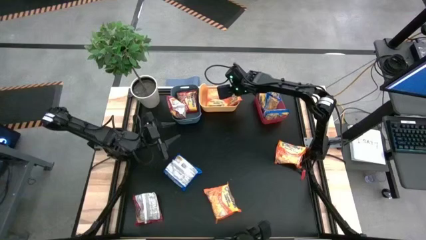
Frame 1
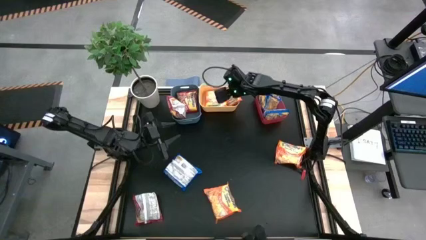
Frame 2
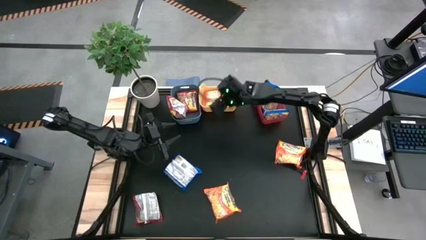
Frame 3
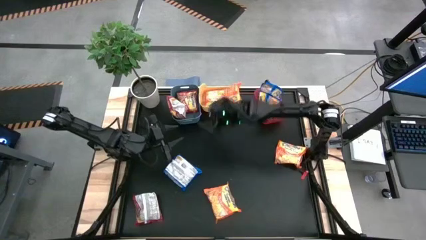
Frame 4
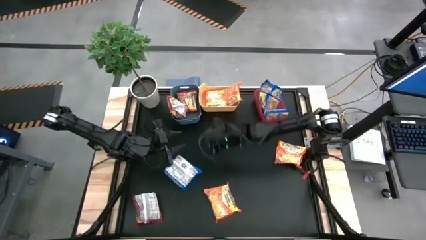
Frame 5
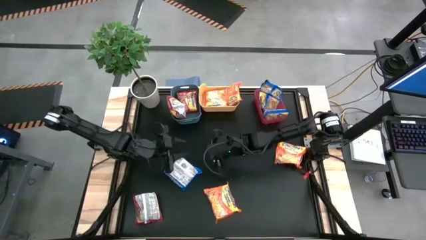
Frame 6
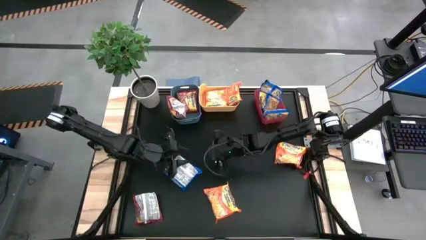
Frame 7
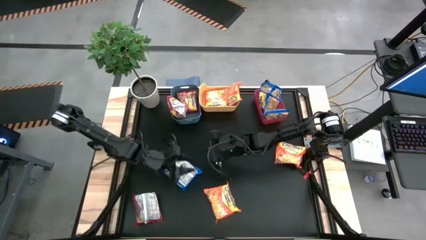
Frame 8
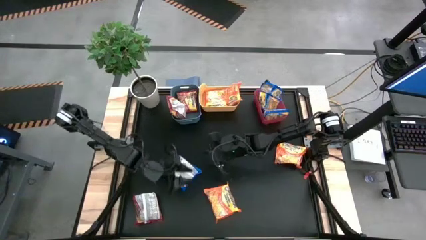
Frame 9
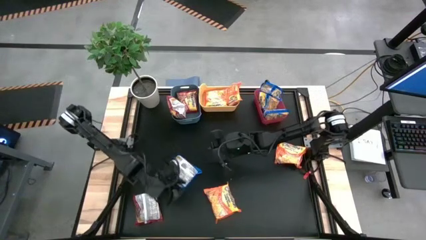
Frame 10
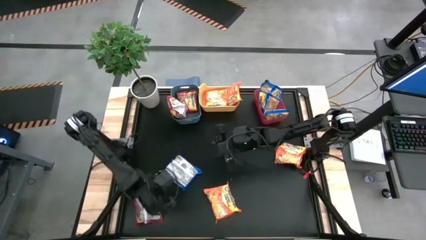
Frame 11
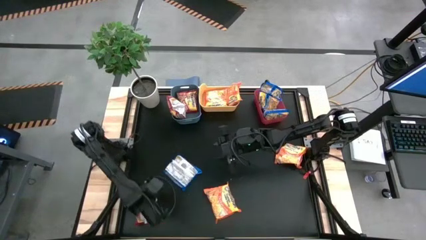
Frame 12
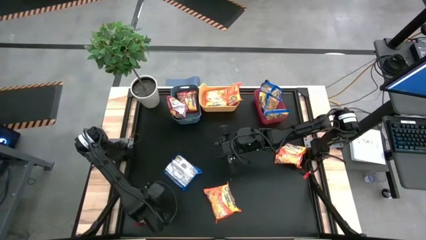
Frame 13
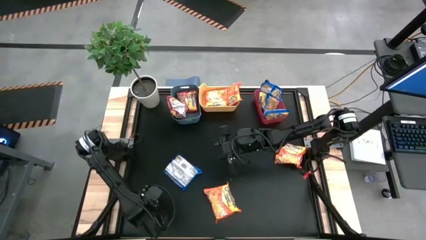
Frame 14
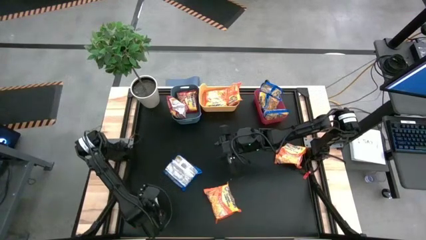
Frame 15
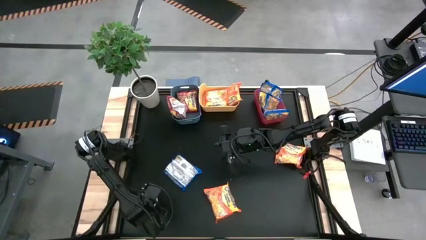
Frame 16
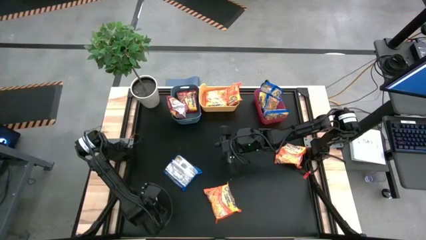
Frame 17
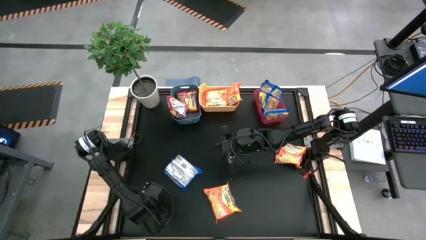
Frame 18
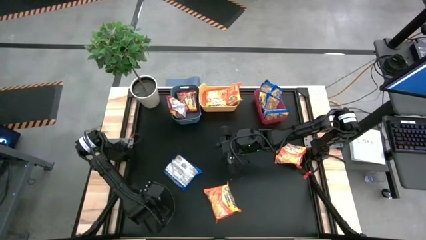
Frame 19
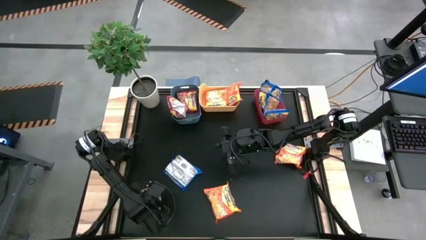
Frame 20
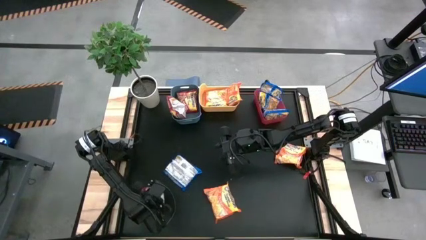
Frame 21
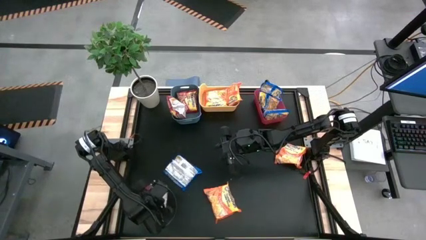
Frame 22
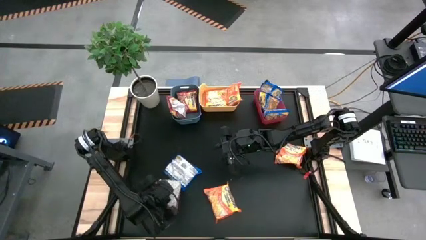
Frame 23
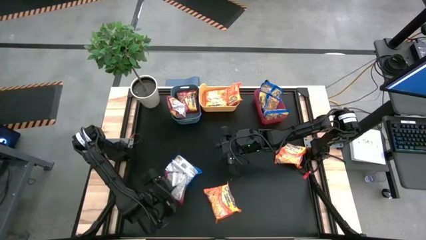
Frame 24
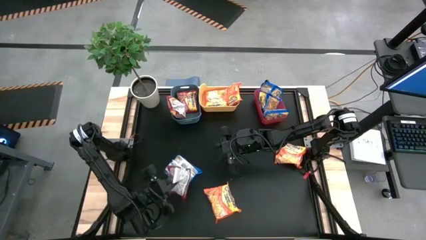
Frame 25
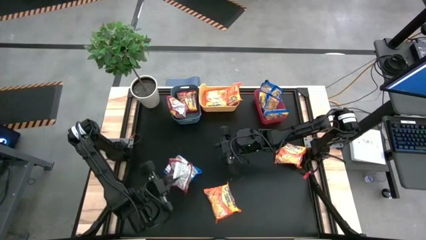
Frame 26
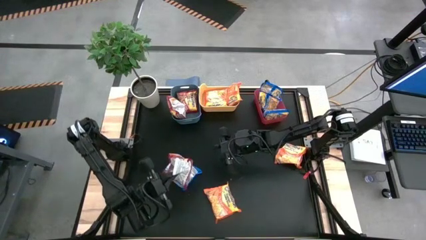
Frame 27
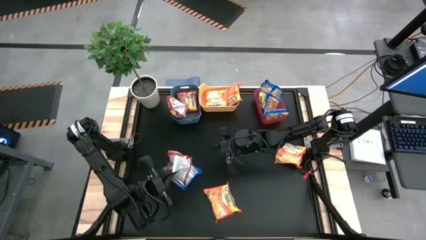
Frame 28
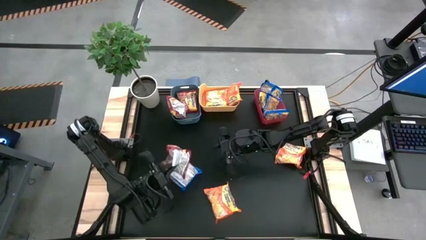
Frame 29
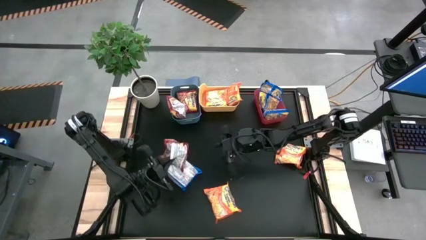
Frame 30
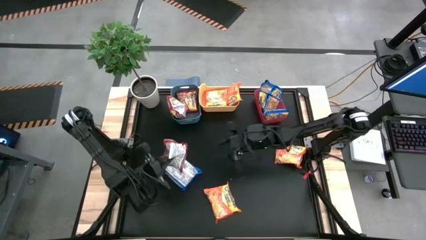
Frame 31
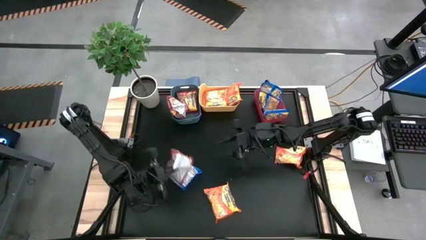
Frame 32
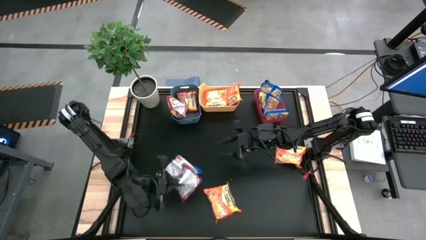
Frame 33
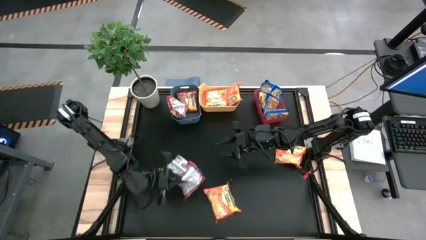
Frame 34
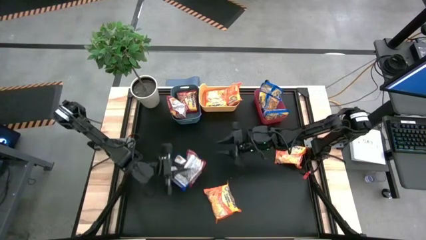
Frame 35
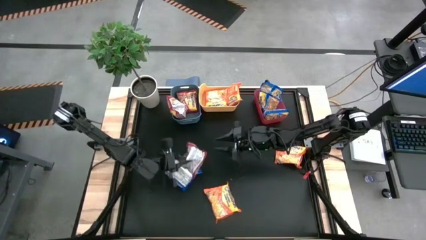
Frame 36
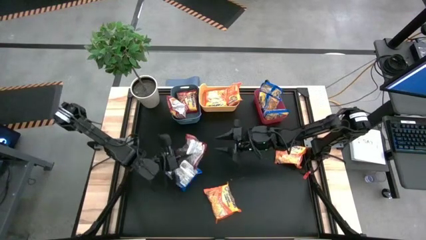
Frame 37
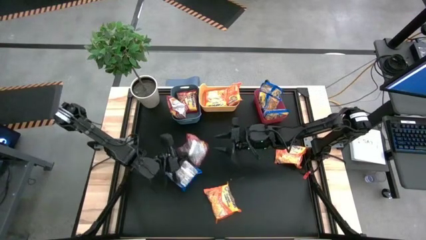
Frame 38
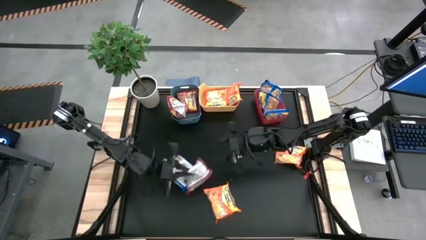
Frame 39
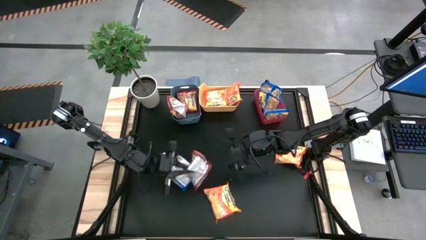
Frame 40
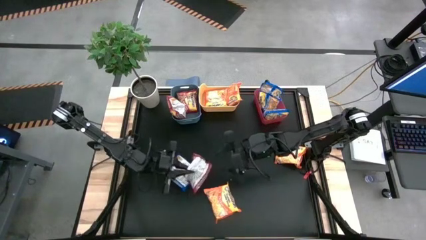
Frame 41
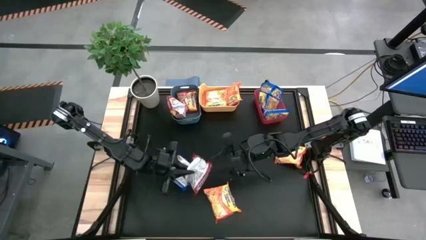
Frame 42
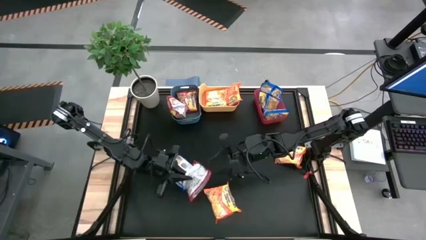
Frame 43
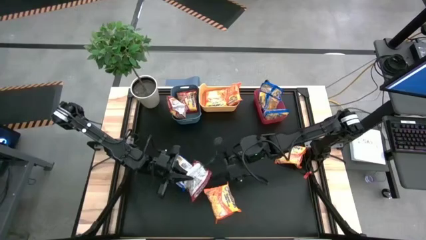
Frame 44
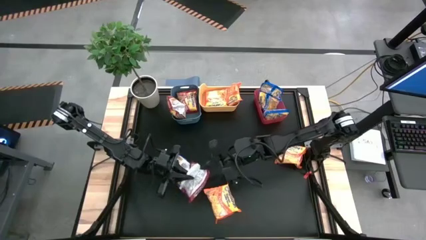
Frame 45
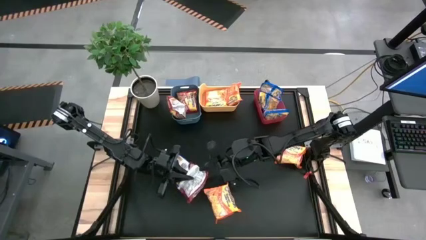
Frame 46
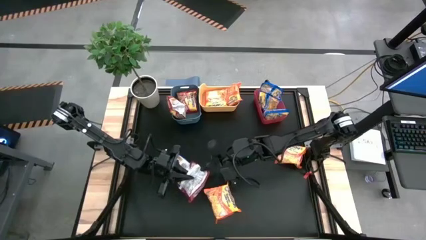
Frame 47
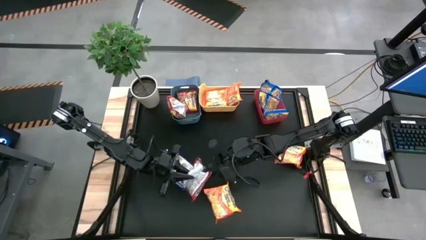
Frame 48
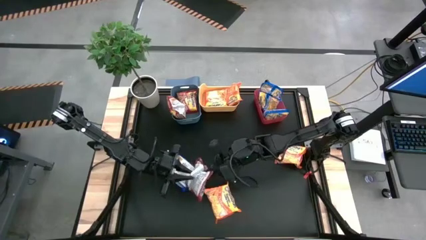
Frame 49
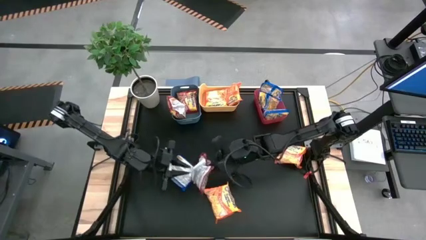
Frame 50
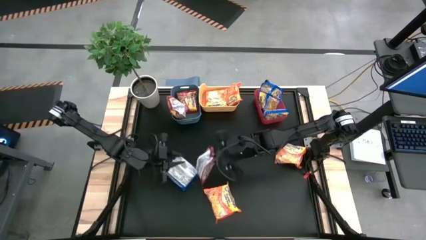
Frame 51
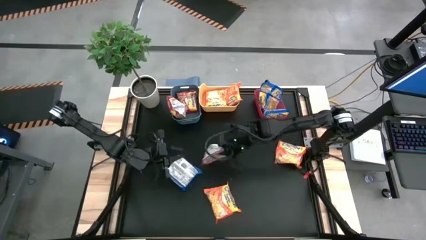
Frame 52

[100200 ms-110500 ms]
Task: Sort Maruchan noodles
Put the red noodle pack into the blue bin

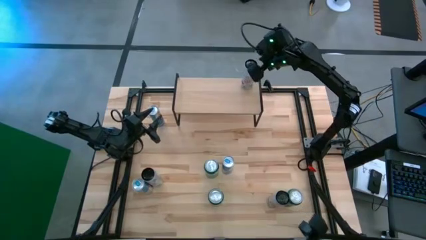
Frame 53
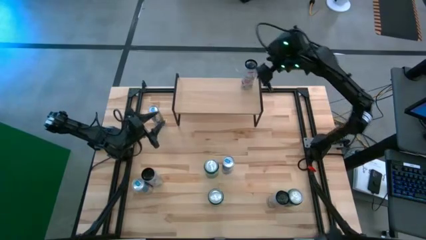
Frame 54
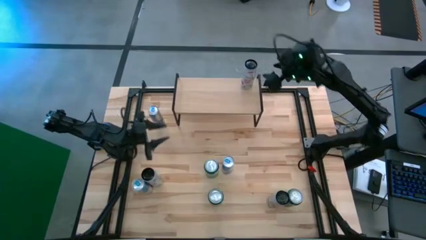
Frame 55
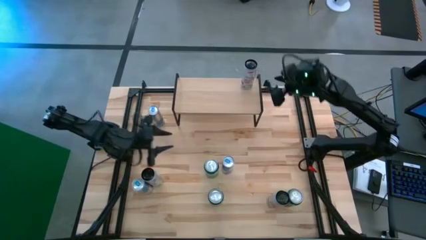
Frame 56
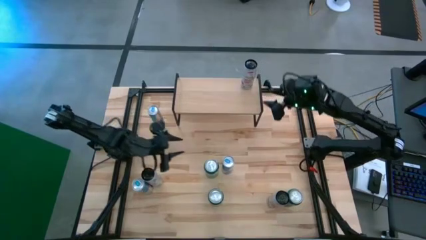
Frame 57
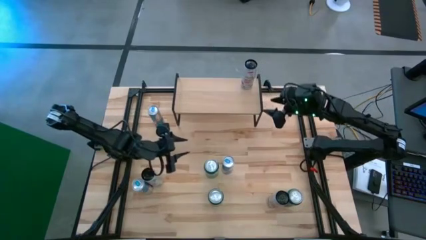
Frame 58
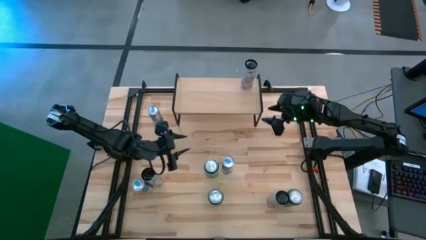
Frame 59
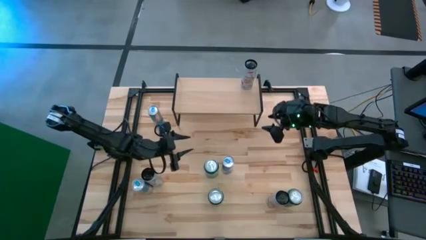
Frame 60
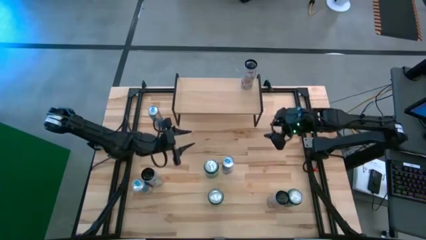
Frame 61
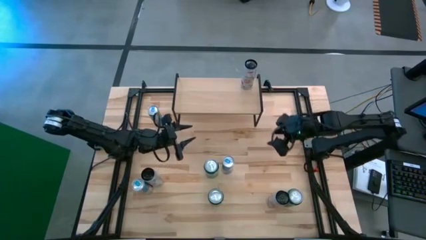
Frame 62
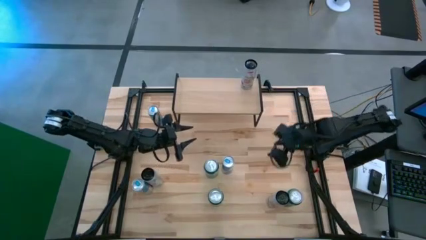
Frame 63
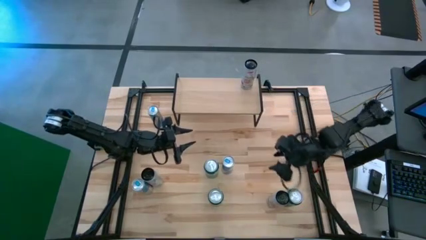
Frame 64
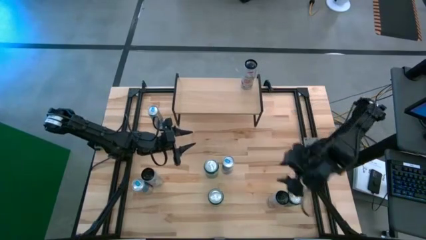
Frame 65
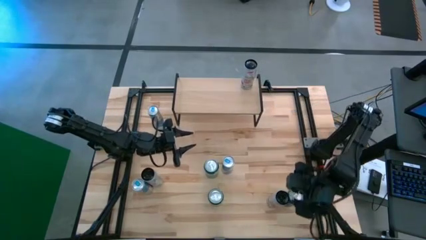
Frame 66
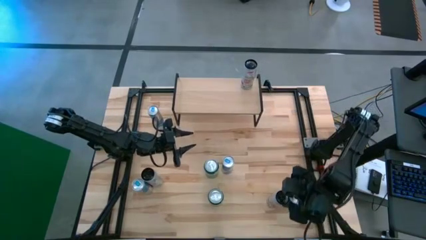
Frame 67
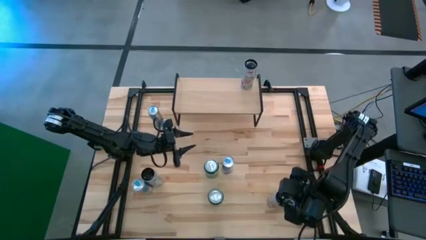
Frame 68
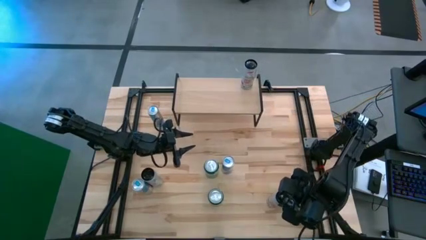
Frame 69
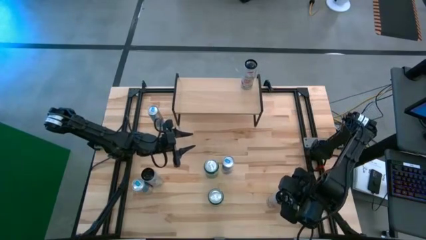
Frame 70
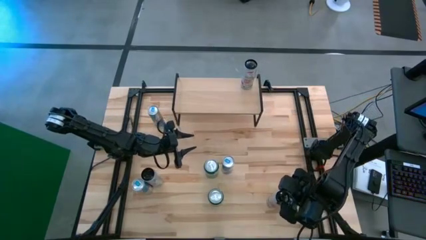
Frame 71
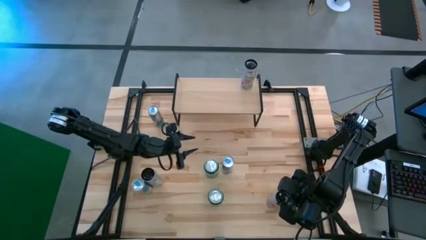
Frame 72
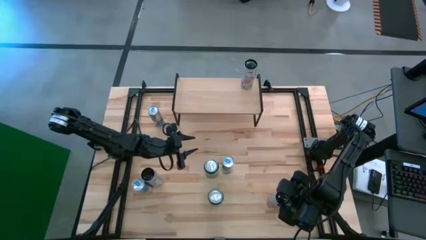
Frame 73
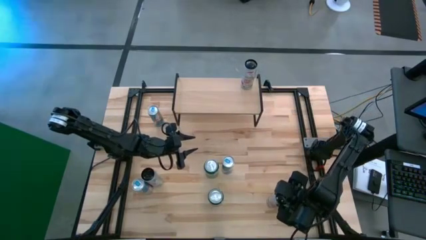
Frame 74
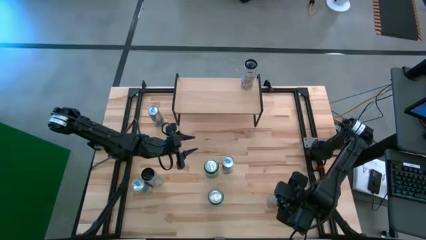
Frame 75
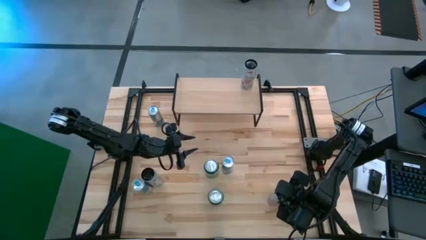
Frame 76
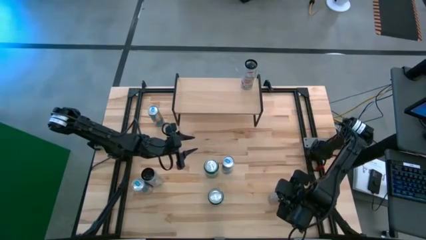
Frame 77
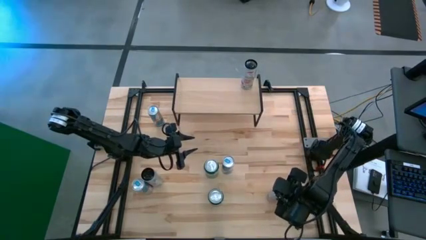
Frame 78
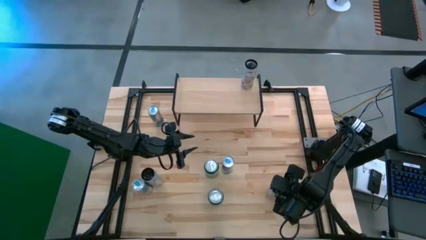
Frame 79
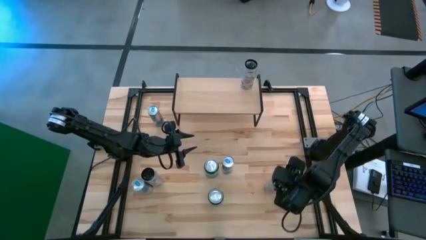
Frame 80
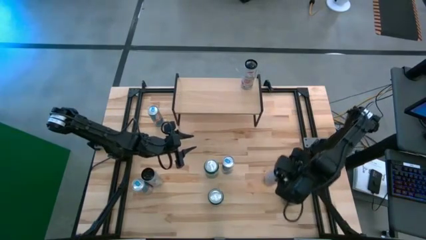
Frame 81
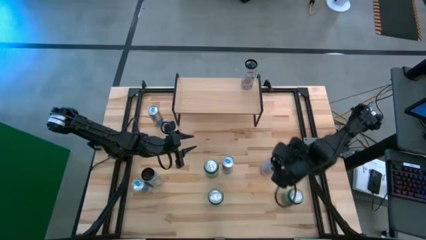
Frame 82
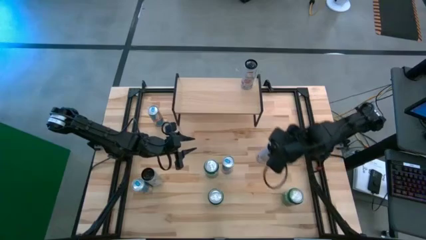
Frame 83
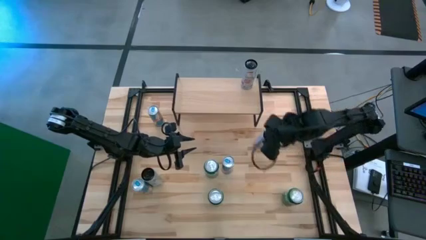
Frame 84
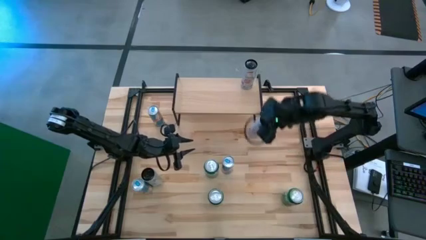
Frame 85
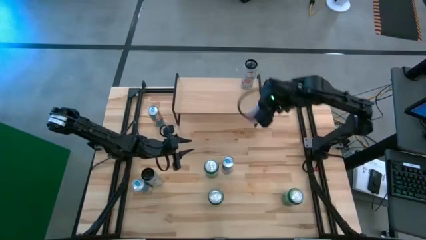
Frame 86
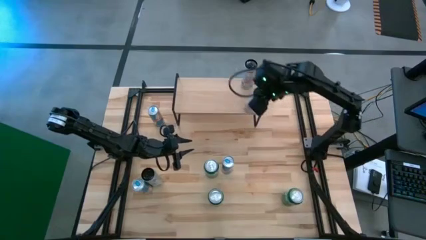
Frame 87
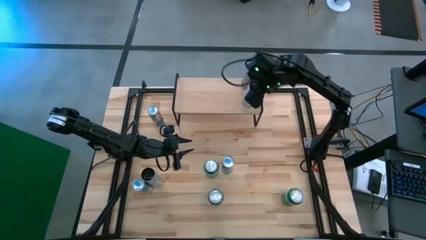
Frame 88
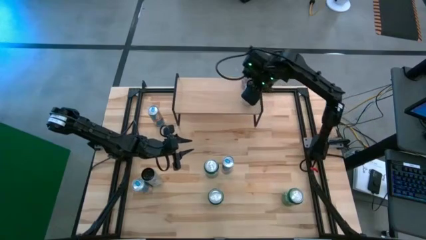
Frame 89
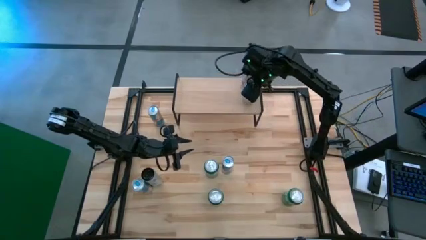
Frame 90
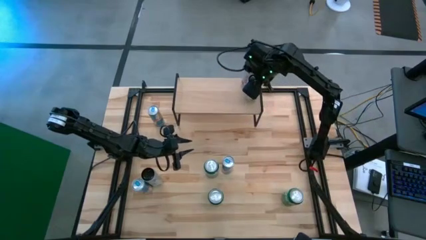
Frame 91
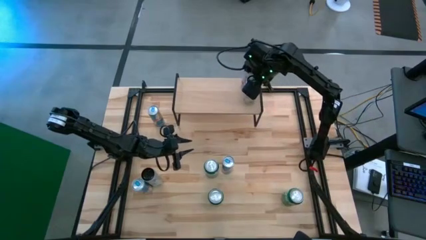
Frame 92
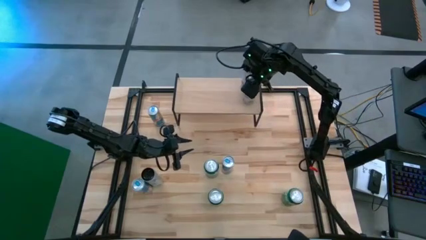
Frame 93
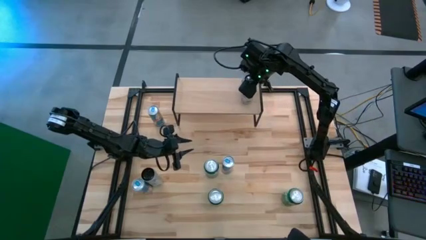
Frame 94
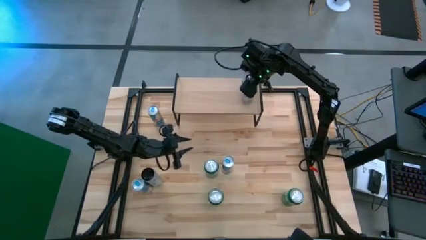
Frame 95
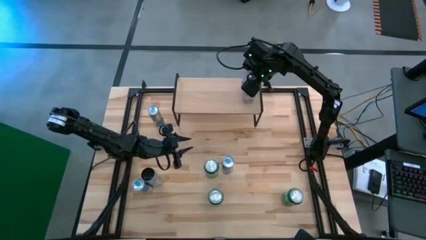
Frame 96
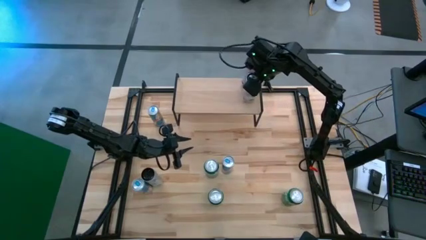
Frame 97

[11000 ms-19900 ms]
Task: Place canned beverage on shelf
Put the right white-pink soda can on the shelf aligned with the other white-pink soda can
